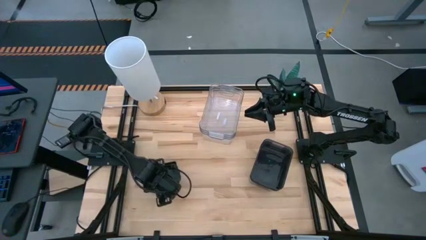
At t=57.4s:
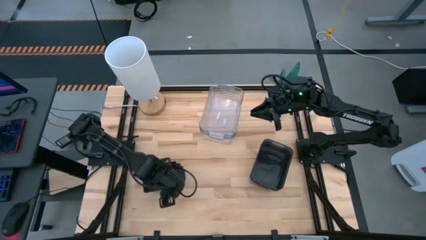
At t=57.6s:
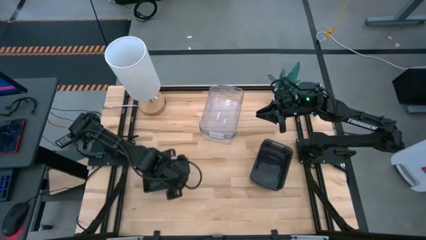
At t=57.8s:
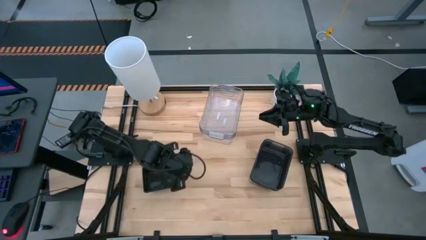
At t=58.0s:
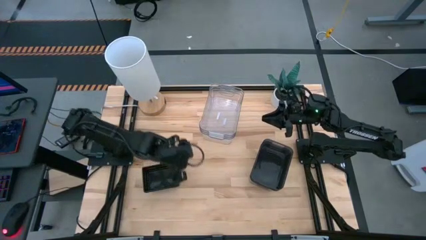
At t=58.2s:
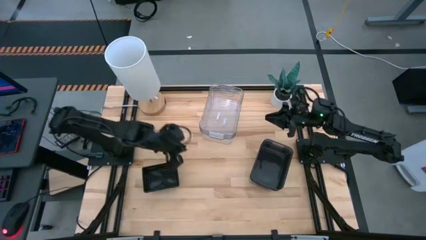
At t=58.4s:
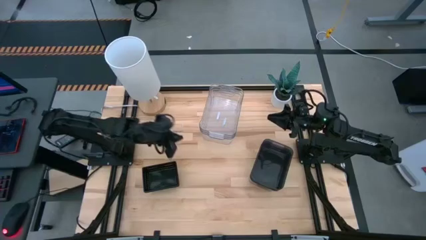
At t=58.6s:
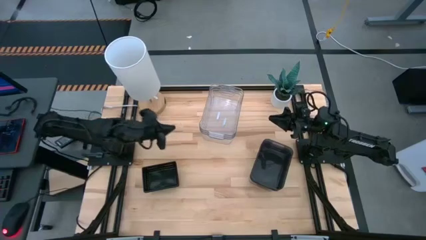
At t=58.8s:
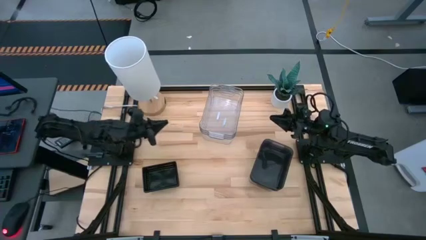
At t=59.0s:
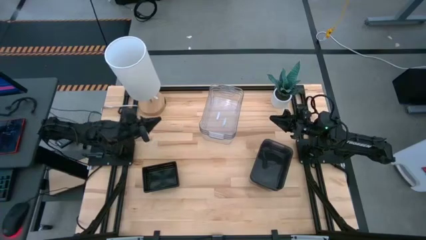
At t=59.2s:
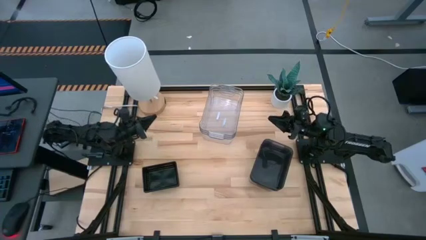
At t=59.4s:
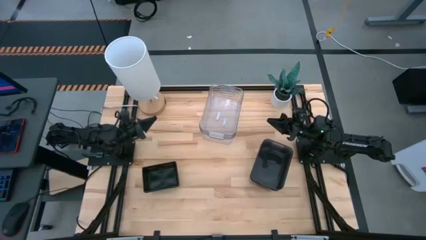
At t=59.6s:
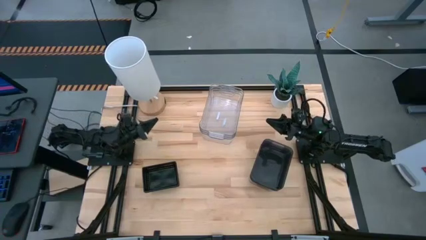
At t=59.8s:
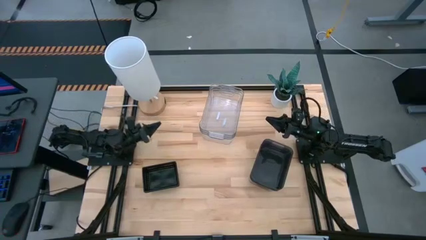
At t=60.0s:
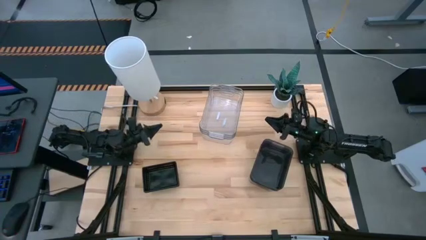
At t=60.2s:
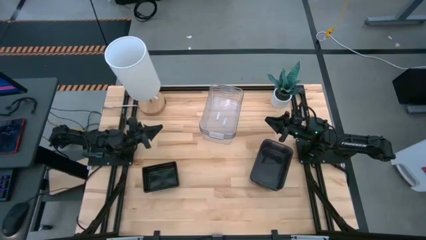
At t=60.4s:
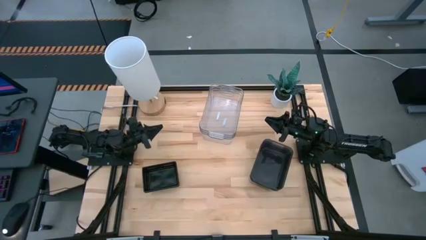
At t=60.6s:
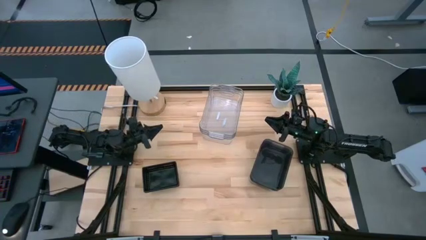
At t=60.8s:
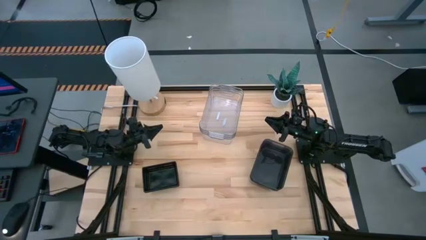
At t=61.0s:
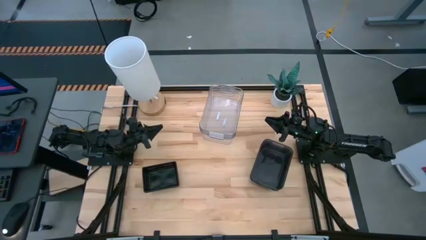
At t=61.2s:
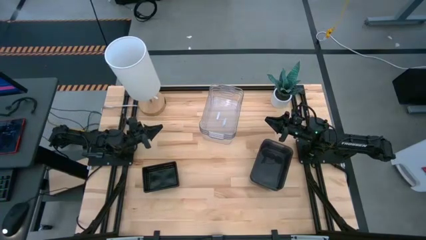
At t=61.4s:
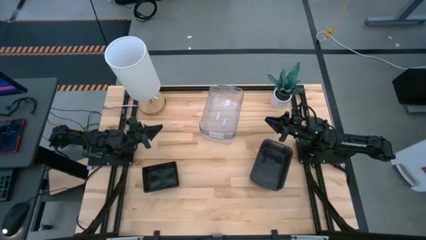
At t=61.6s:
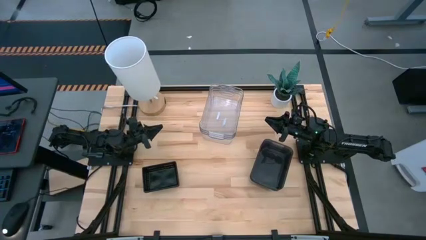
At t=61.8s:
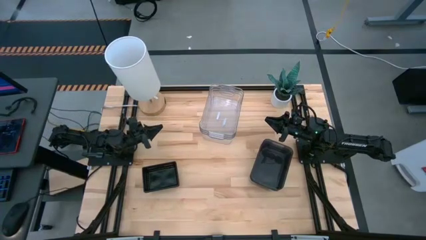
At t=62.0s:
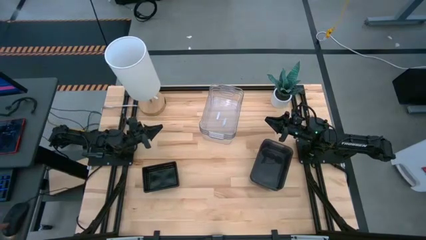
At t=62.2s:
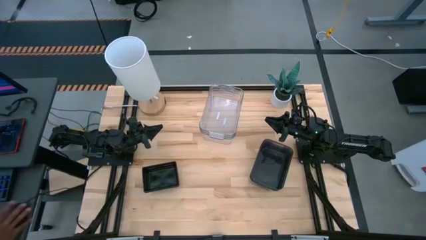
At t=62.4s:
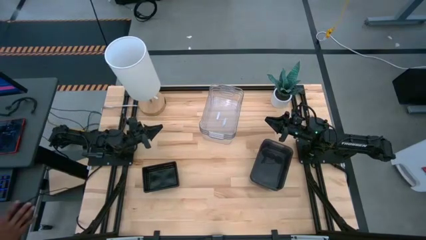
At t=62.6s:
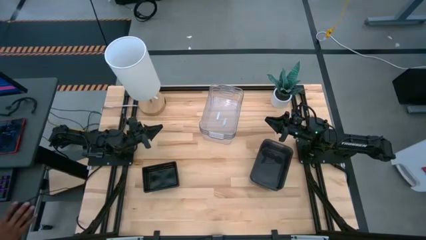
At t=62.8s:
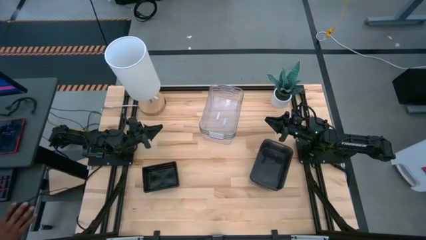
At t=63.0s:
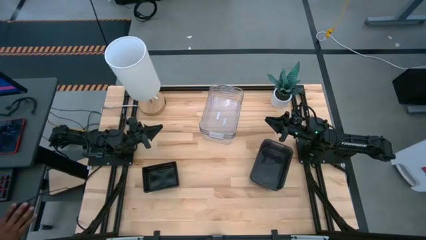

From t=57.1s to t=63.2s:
Return to Home Position

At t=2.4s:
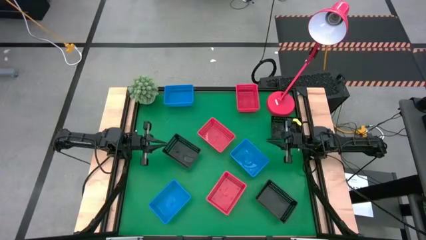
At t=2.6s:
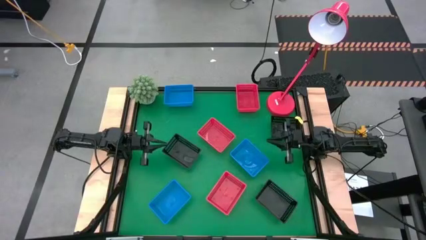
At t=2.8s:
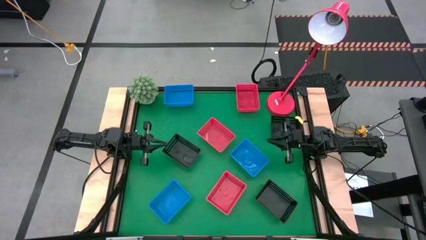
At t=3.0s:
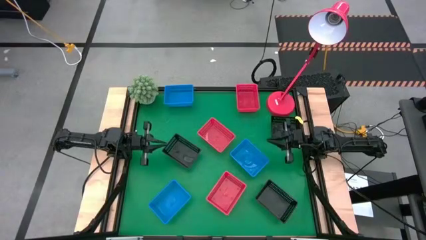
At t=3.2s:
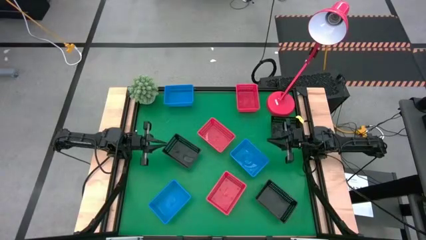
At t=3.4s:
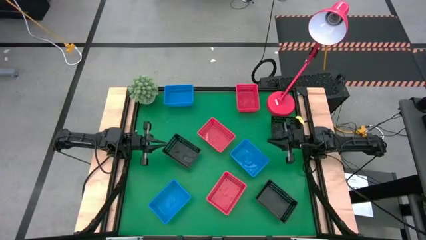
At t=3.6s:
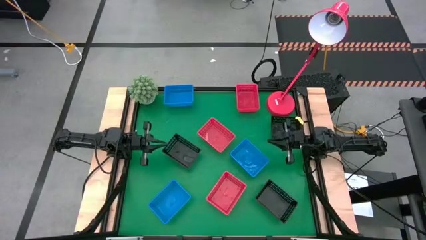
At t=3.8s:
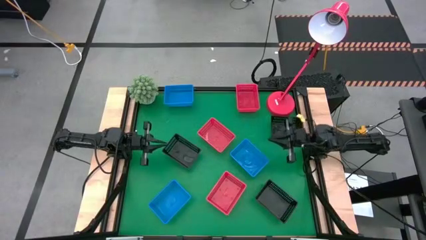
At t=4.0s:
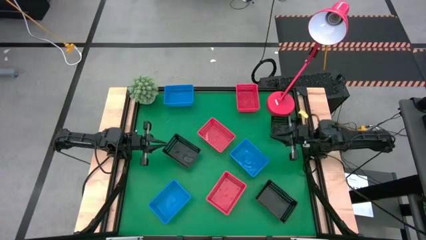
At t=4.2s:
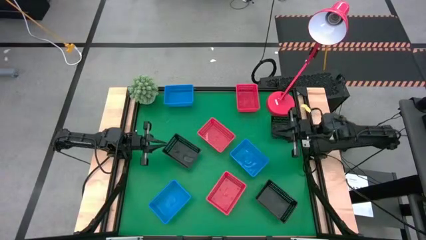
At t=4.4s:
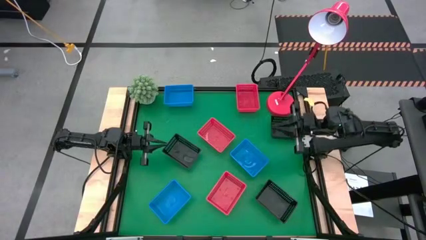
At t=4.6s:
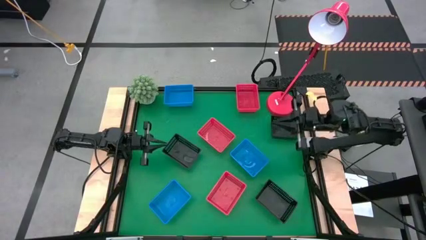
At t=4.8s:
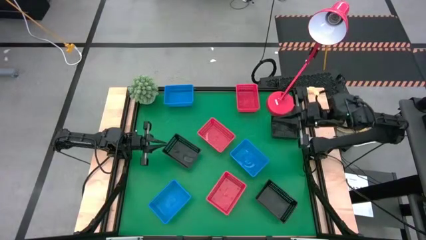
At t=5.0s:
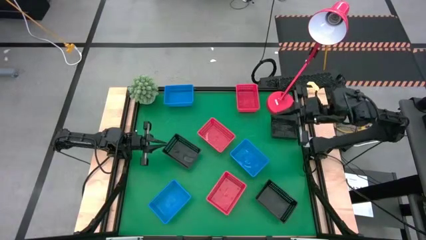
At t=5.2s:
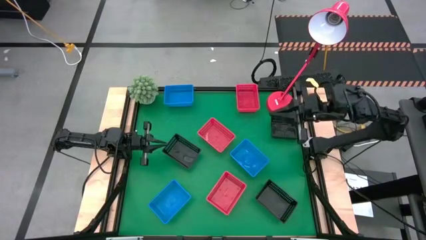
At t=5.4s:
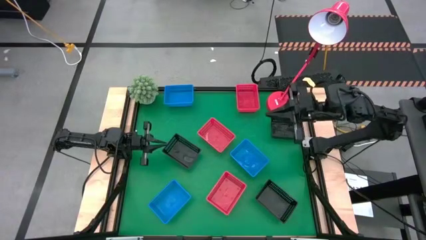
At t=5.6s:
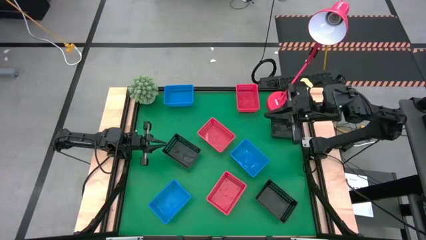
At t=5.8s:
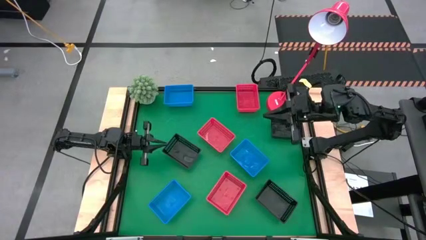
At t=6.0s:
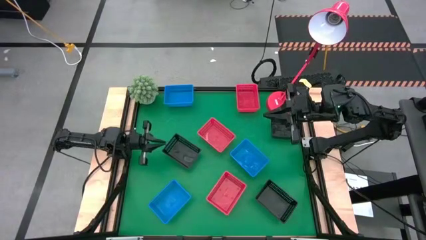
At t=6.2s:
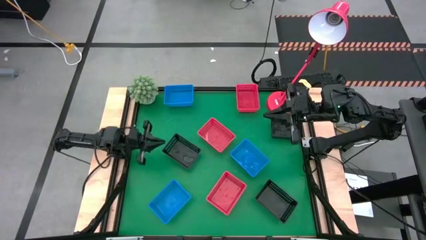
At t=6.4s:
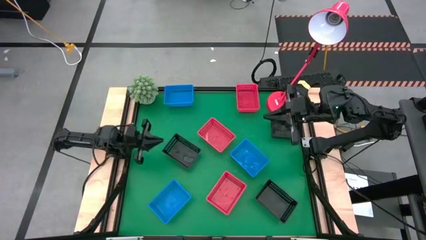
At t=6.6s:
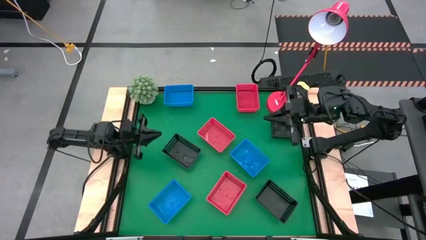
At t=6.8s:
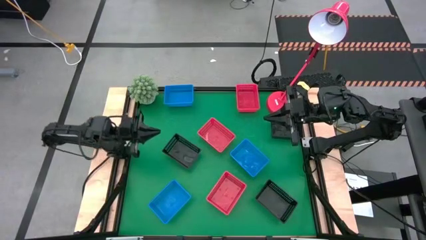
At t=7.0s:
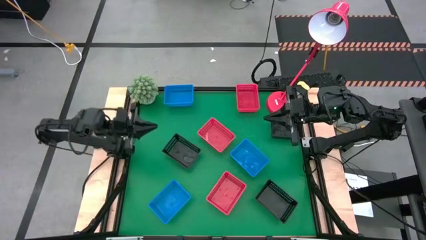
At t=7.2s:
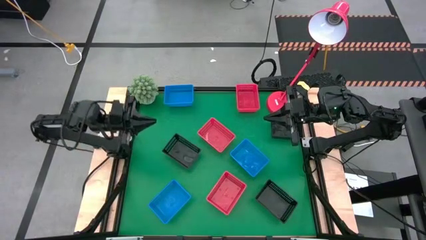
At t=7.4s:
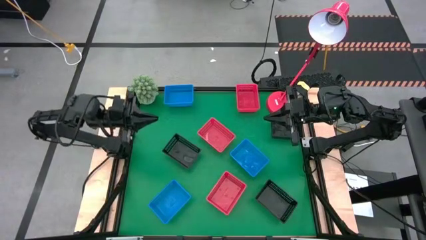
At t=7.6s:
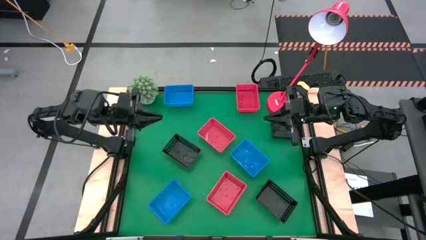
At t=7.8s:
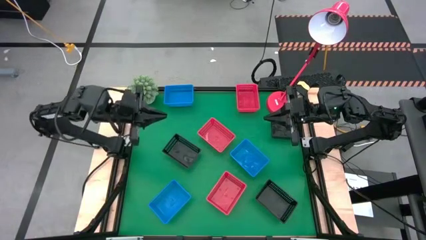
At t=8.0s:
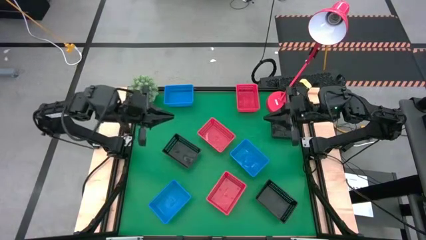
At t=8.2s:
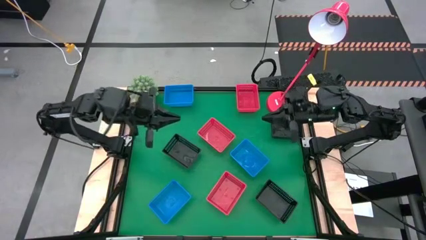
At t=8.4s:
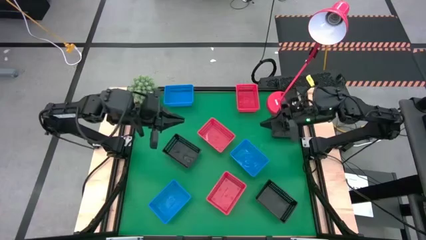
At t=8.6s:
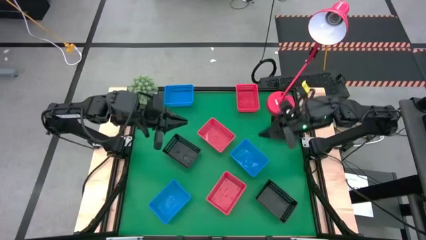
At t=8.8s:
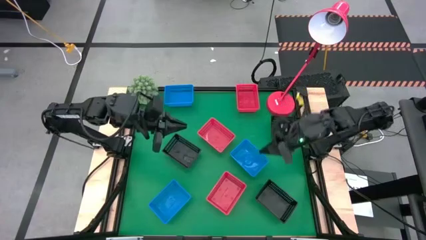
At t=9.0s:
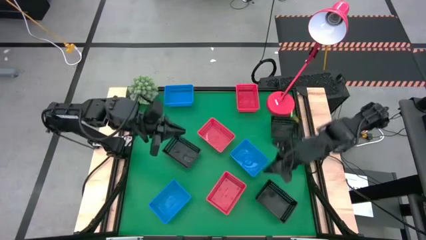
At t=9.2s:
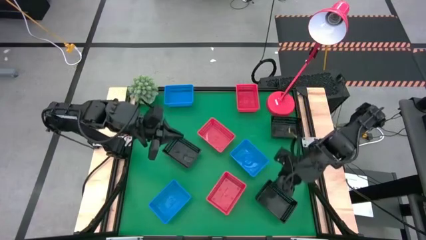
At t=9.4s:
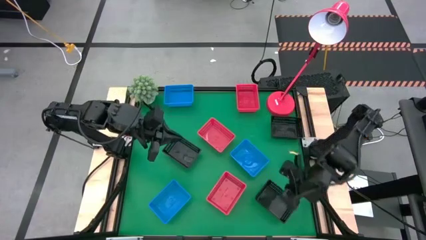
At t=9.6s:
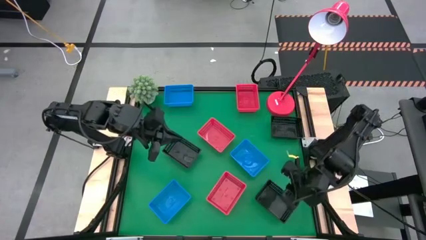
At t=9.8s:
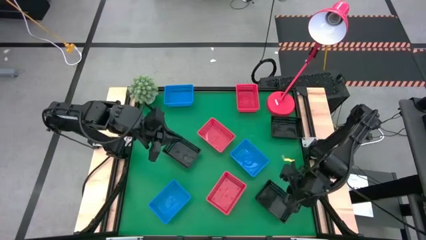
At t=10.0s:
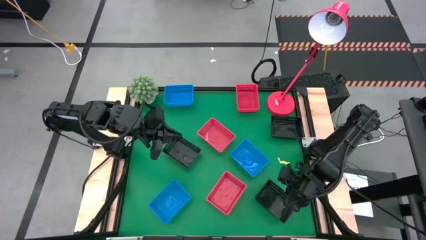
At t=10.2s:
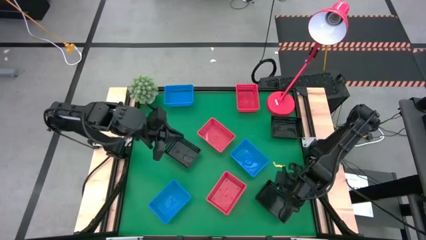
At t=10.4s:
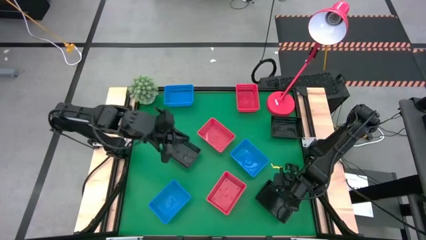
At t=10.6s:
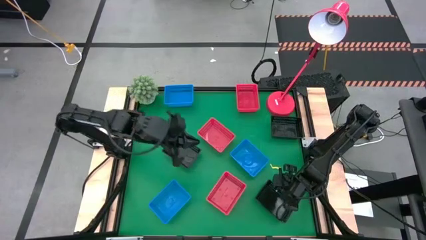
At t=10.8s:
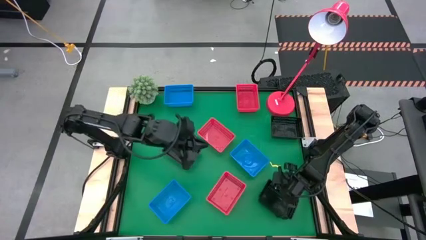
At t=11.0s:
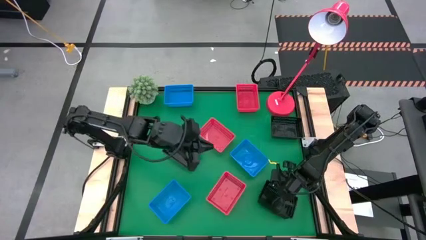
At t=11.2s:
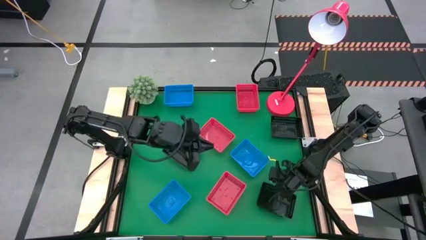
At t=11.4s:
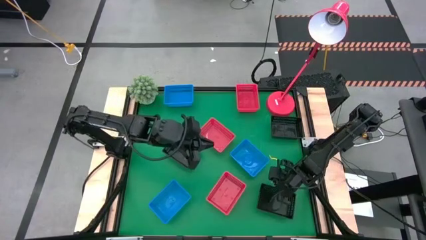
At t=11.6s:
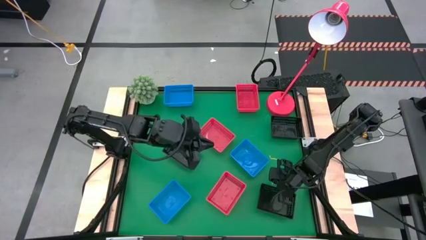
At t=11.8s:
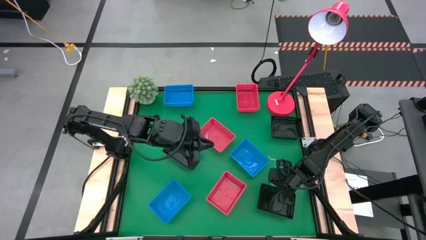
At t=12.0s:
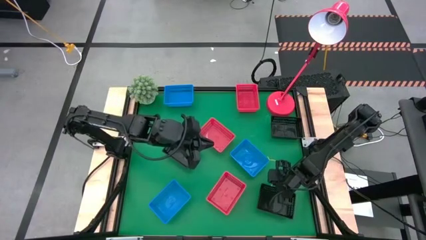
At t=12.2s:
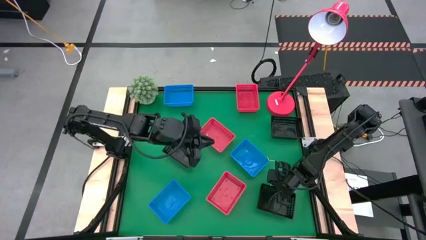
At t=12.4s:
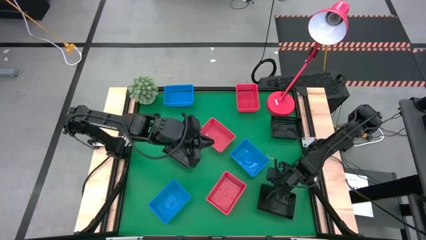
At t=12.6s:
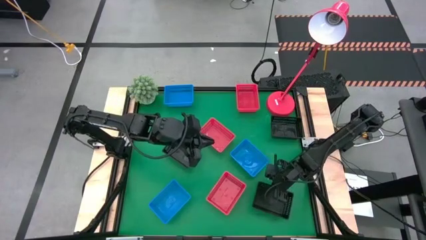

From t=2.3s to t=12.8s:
Stack the bottom black bin on top of the right black bin
